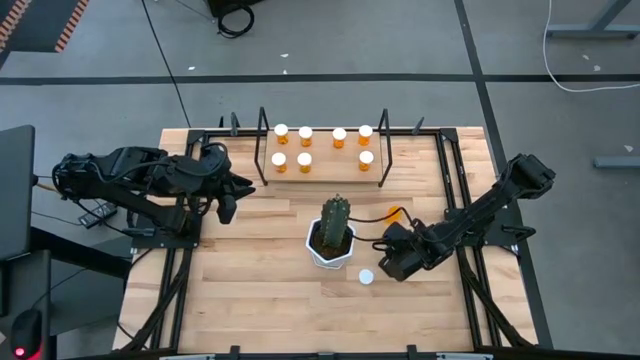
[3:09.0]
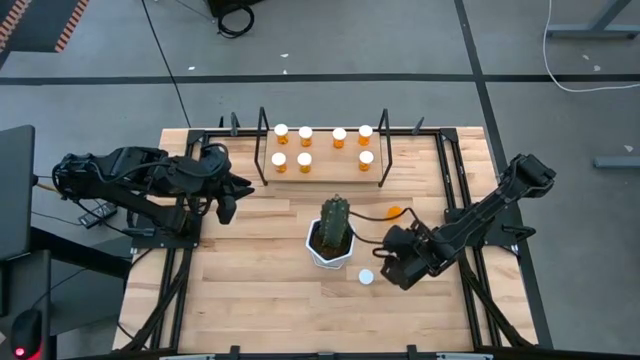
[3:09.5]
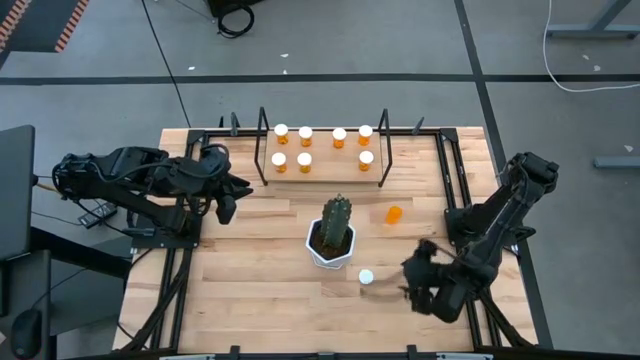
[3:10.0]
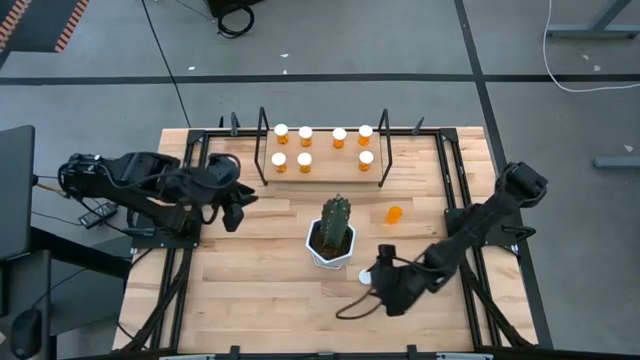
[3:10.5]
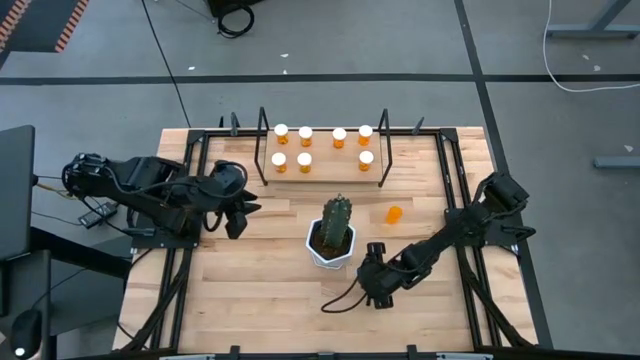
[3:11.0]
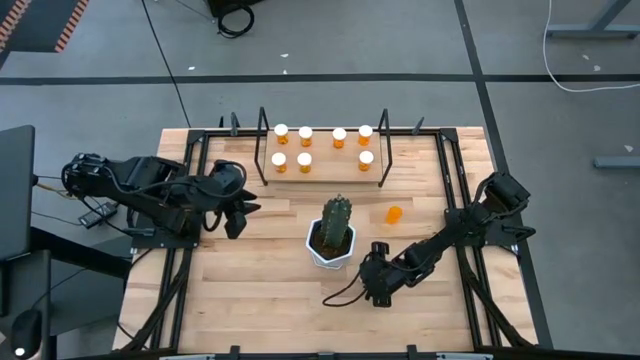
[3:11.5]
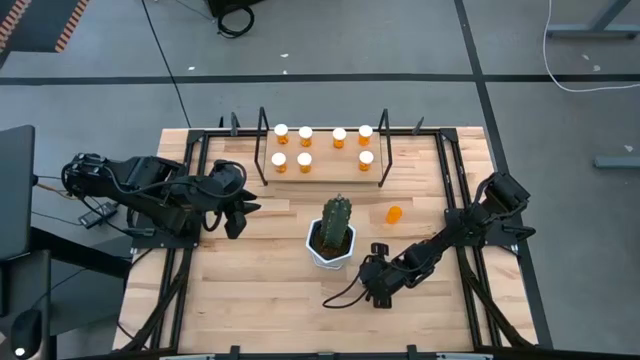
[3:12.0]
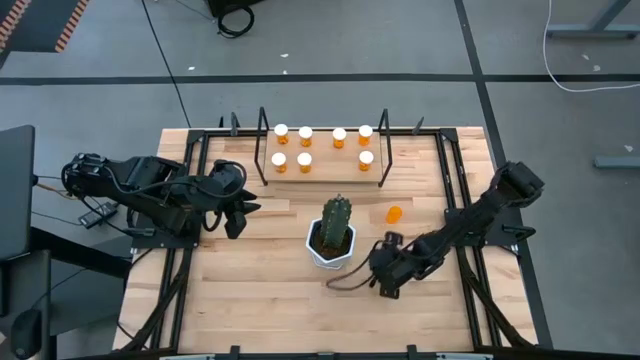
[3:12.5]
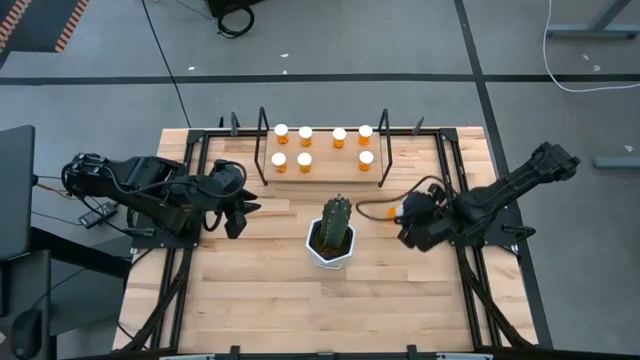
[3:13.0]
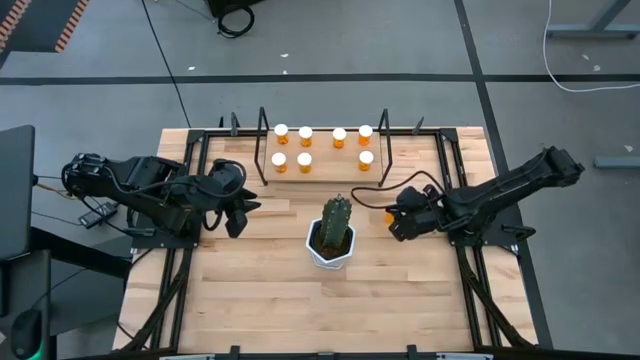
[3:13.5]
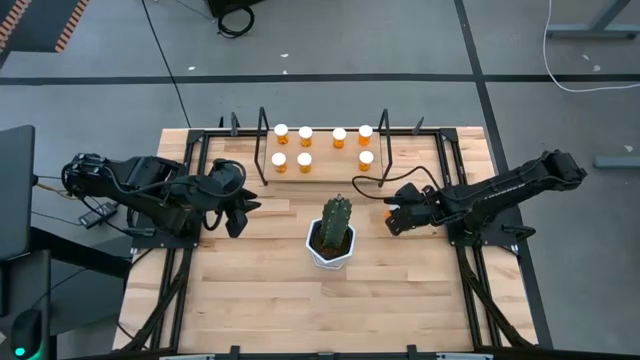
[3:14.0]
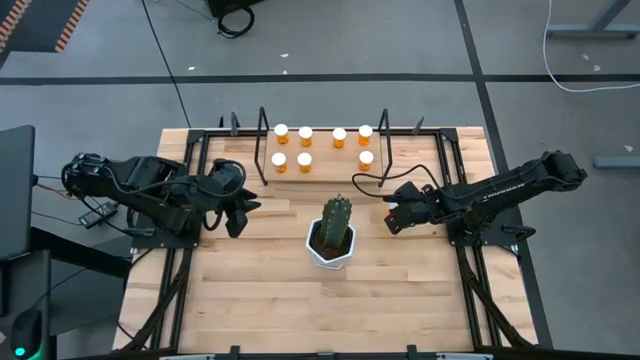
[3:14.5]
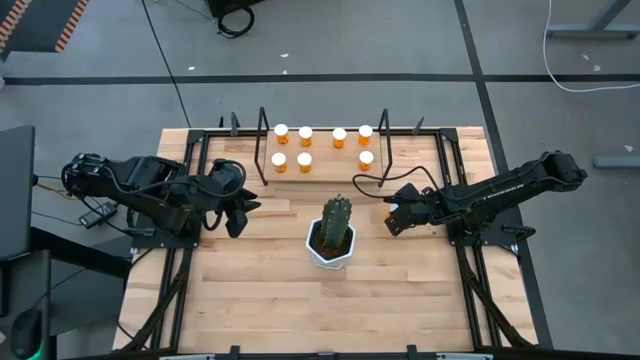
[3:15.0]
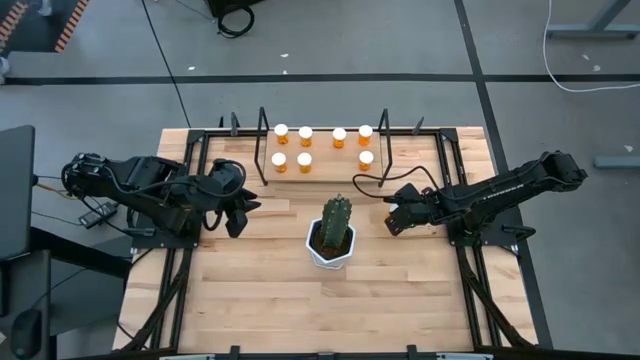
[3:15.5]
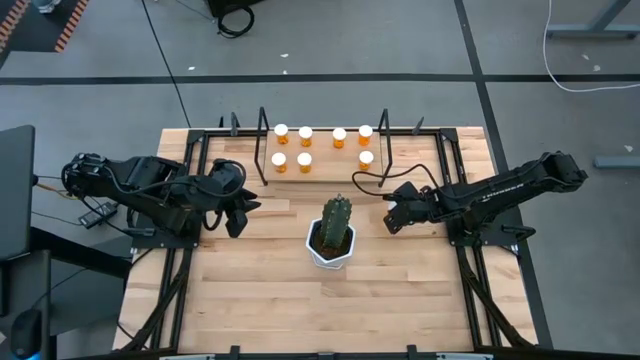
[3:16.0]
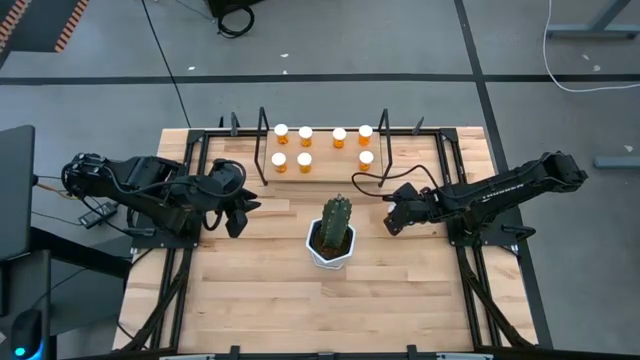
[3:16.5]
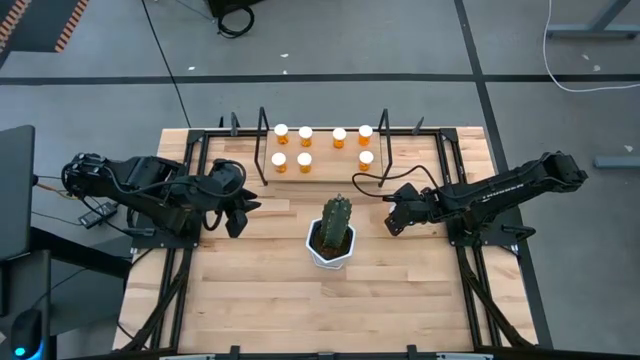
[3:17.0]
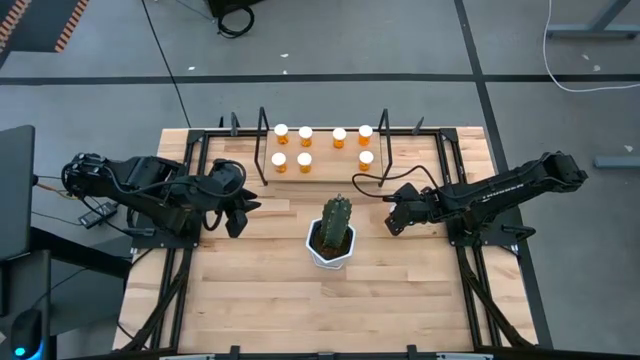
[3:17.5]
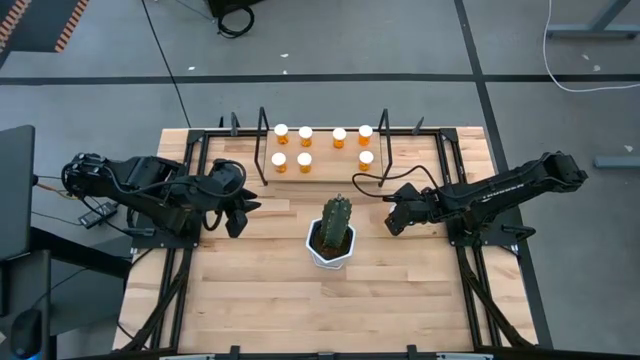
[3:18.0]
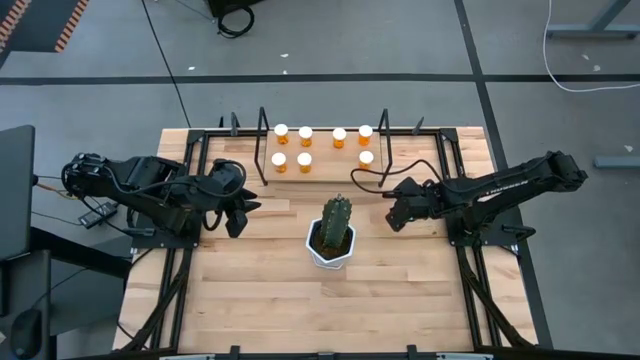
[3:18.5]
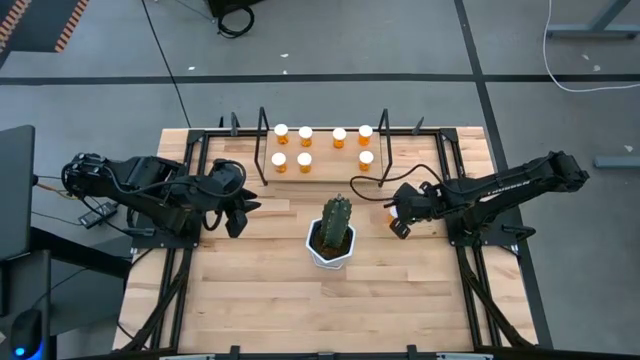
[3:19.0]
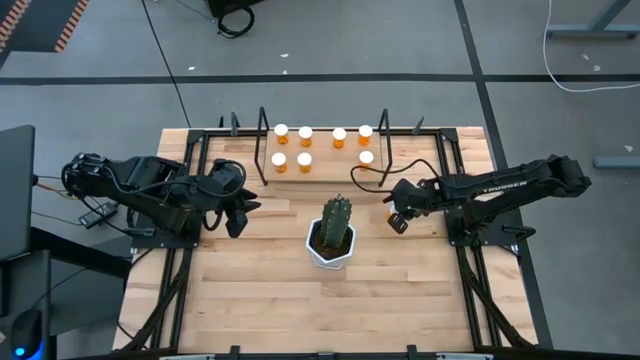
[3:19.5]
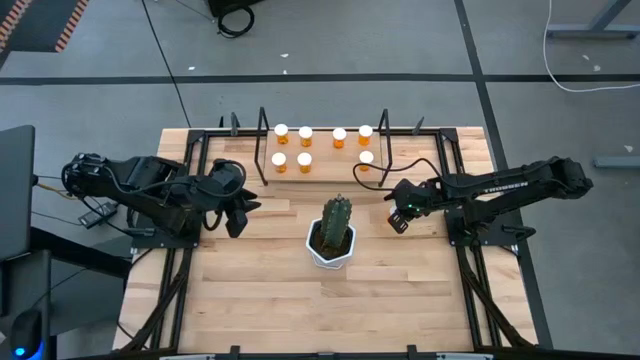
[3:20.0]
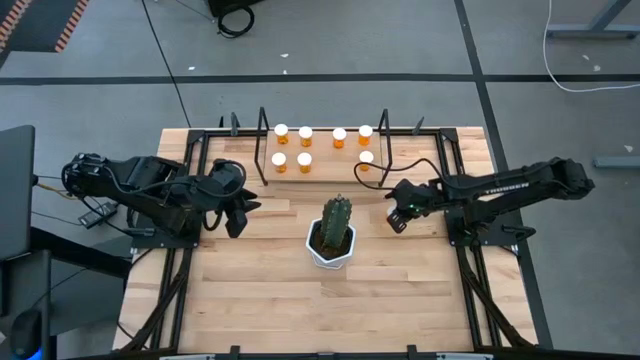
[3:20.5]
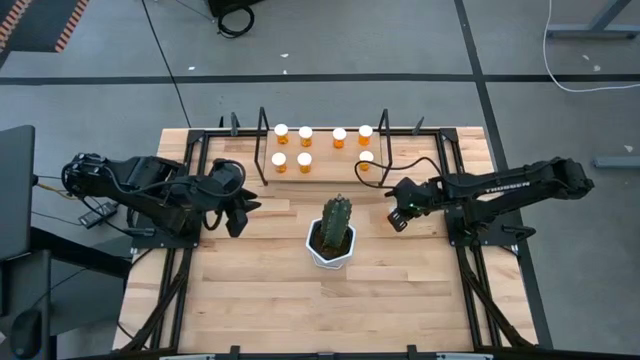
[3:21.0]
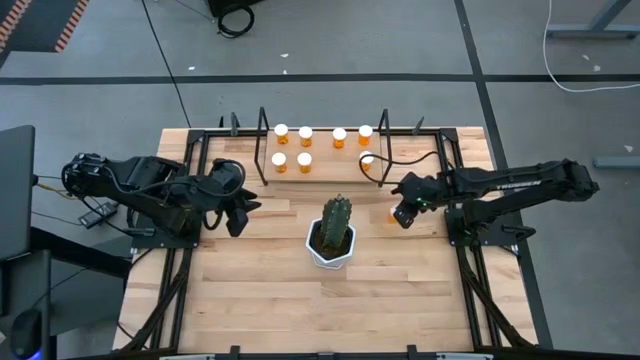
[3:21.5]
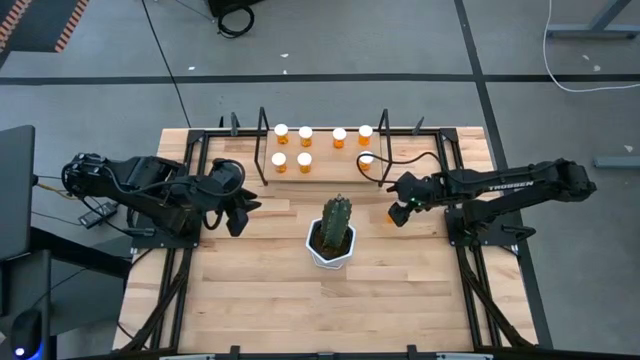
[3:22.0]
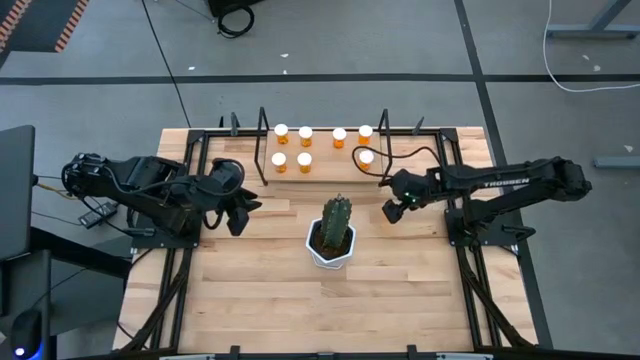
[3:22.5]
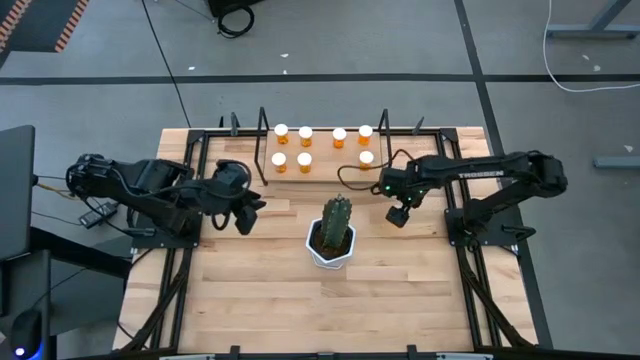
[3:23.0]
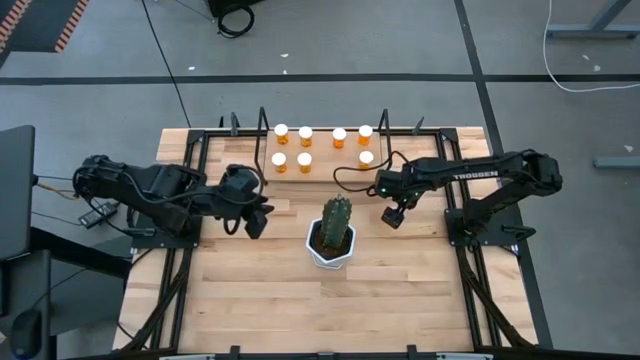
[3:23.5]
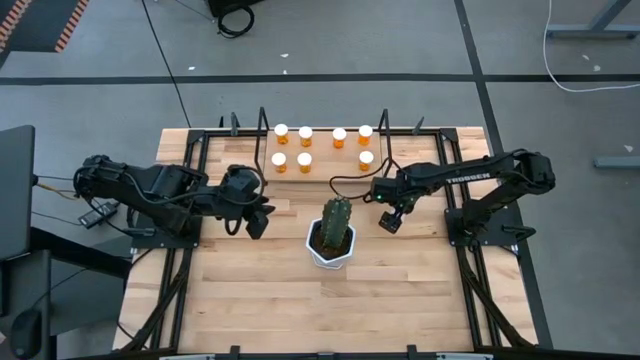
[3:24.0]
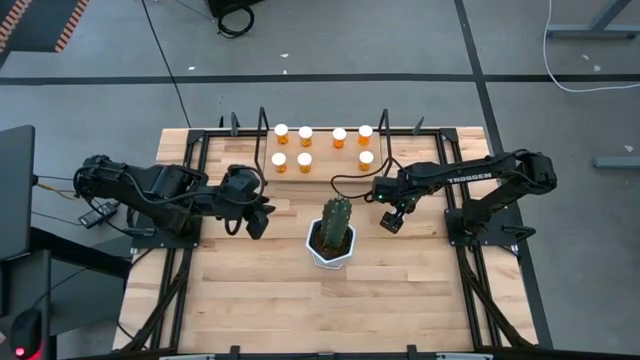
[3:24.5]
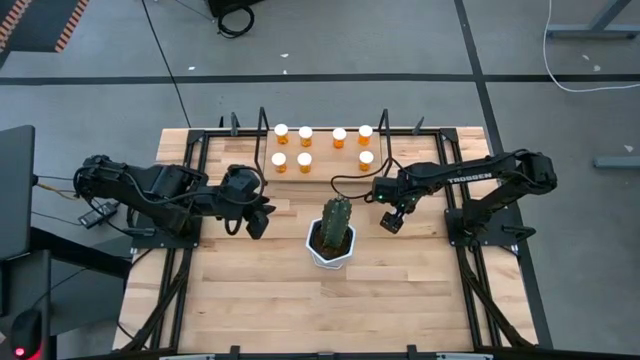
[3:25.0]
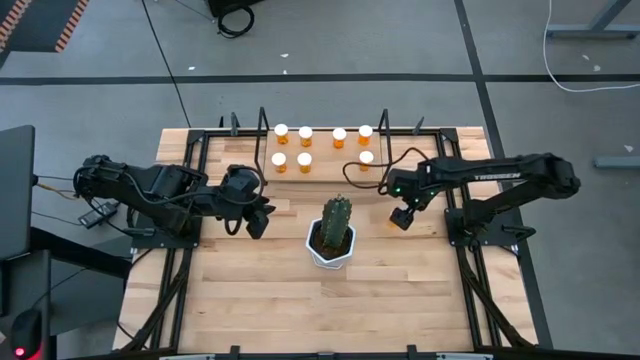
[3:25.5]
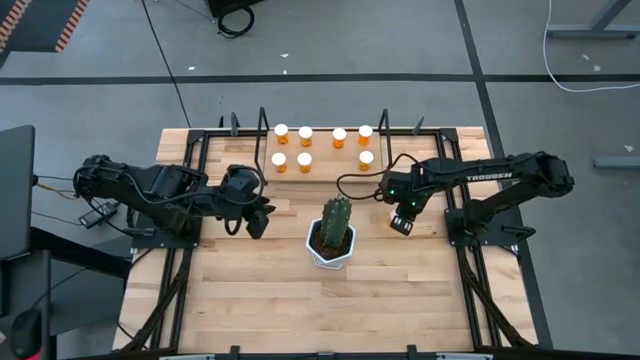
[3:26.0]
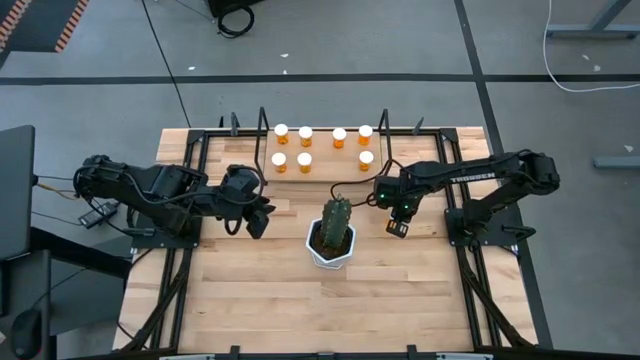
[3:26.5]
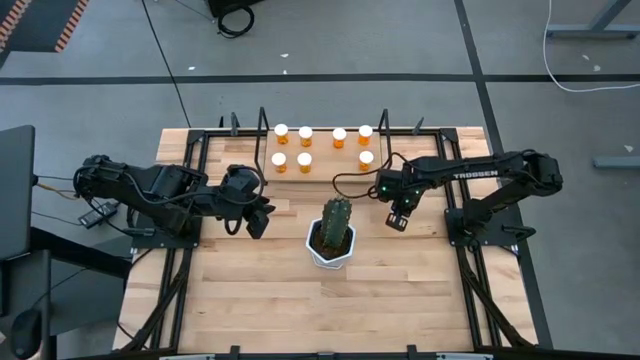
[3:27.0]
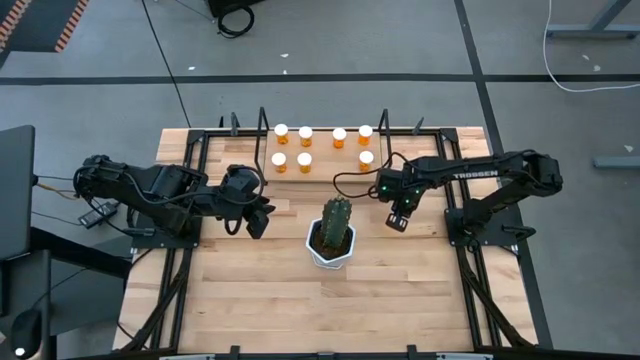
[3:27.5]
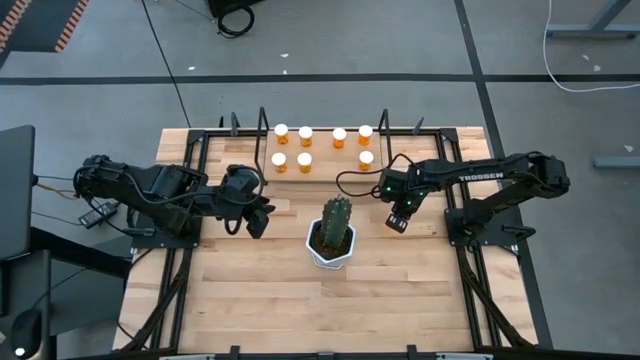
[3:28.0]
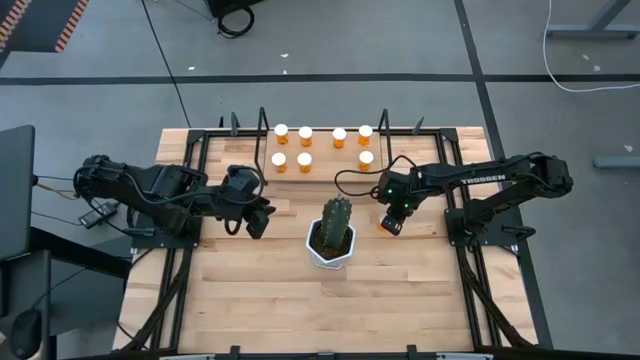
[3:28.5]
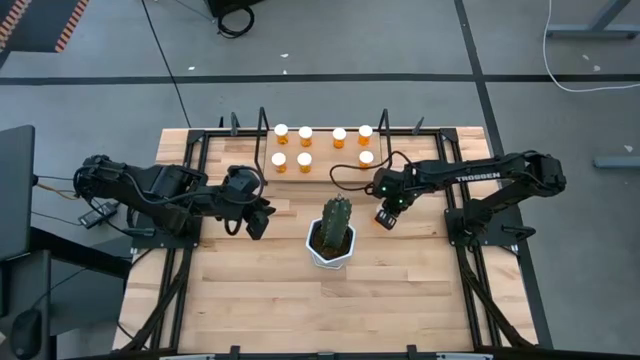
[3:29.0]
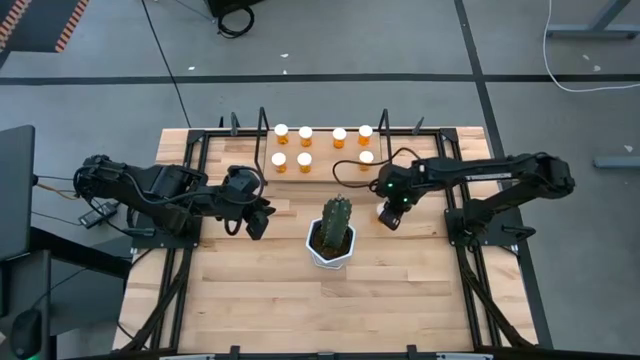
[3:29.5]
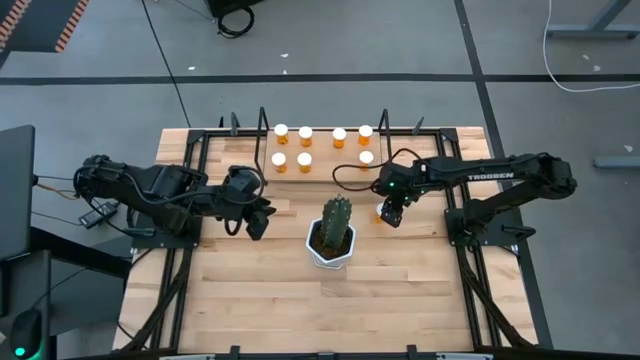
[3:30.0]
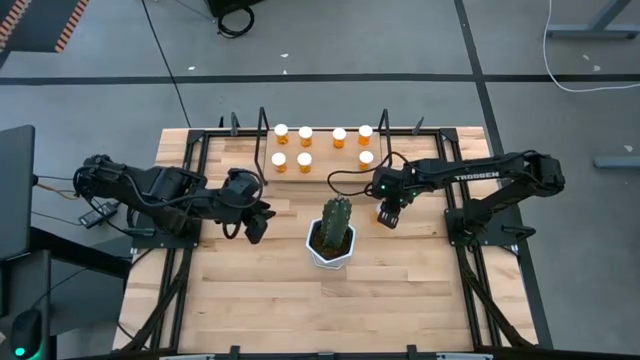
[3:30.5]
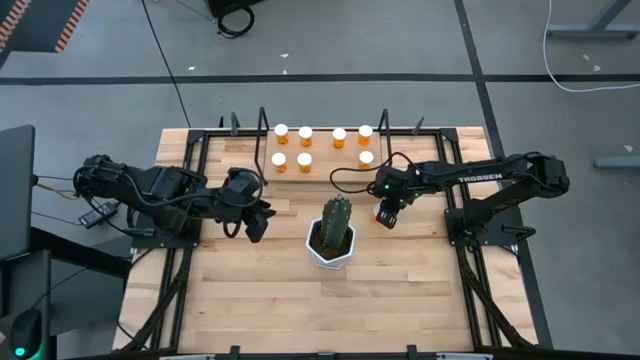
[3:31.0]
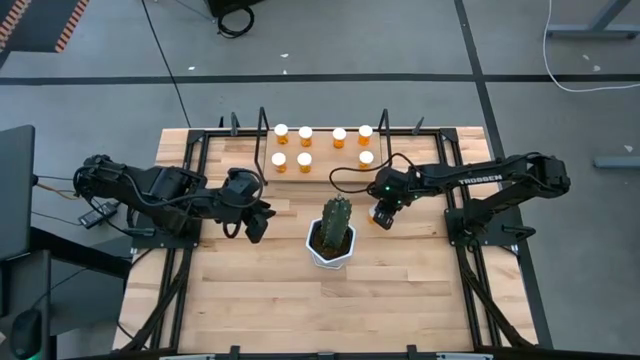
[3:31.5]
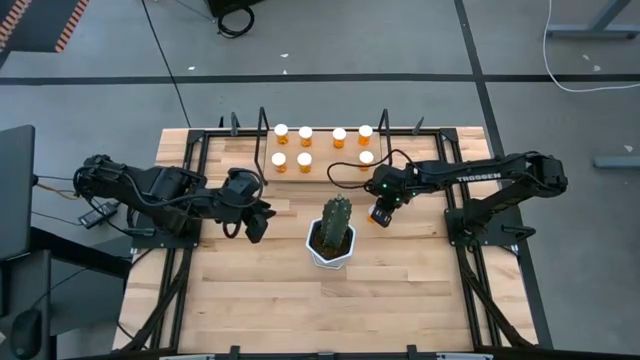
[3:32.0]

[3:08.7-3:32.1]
Task: Pick and place medicine bottles onto shelf by color
Close the orange medicine bottle
